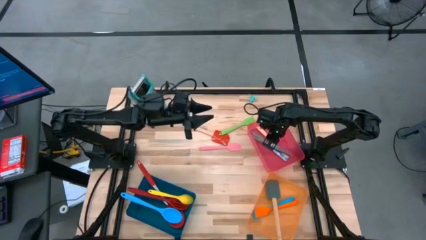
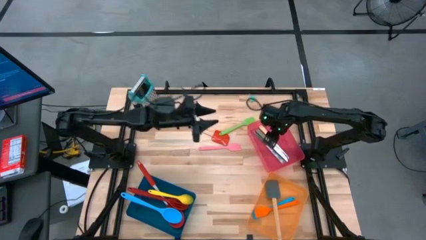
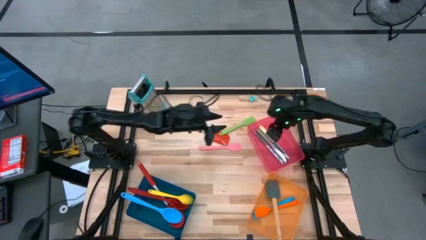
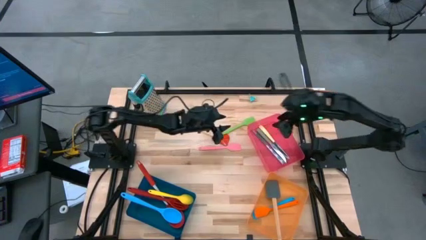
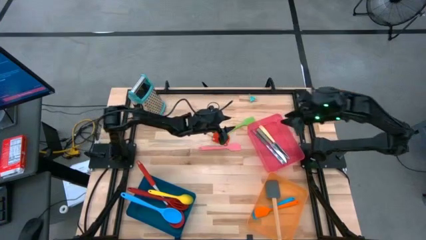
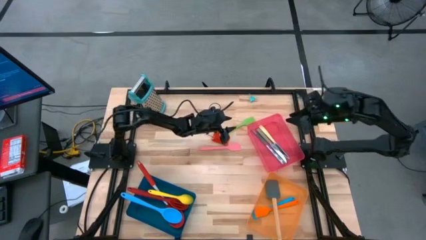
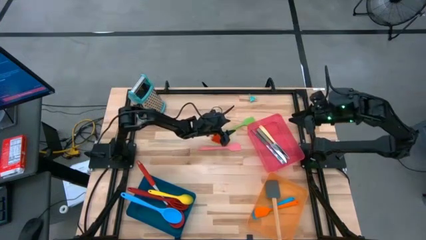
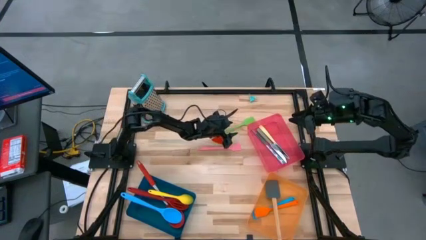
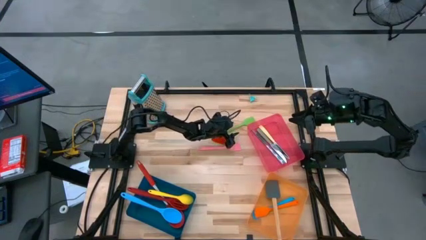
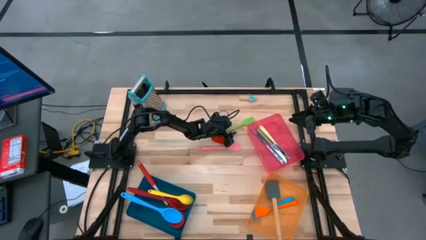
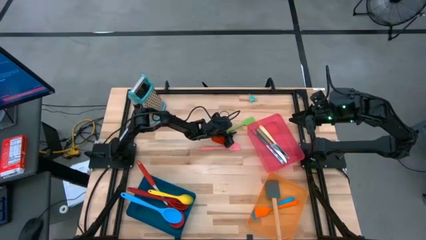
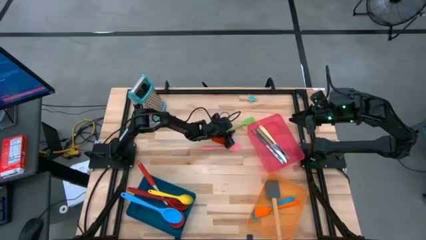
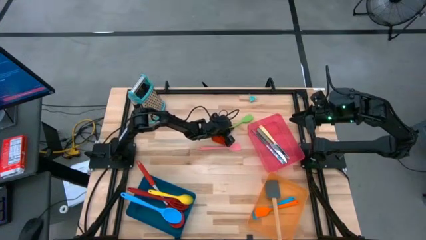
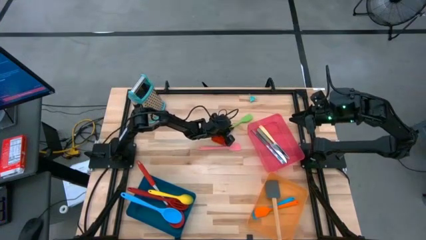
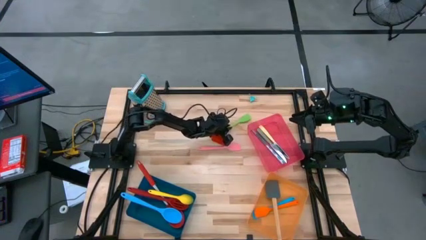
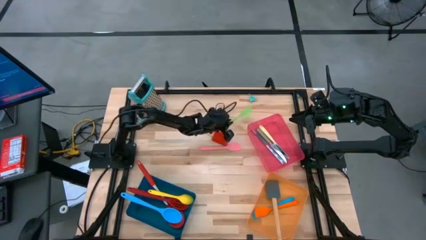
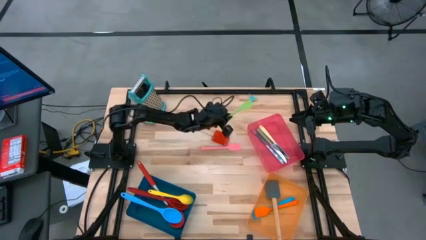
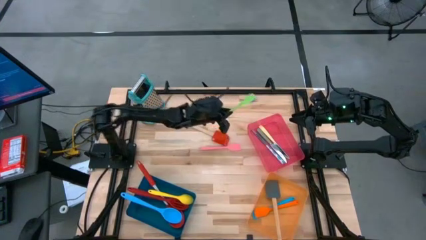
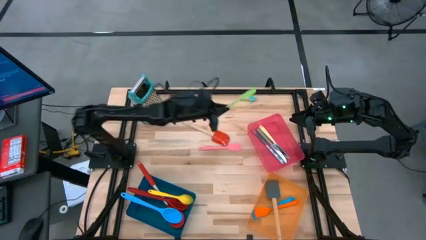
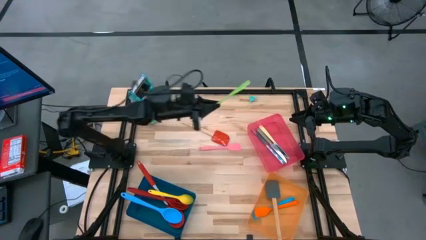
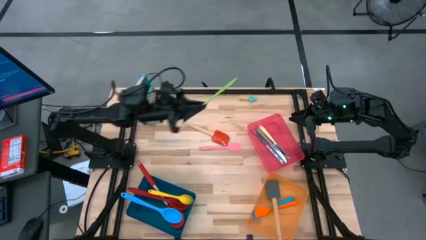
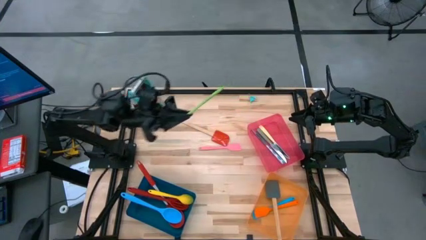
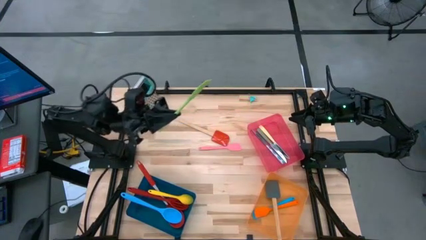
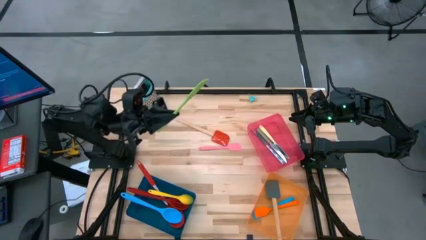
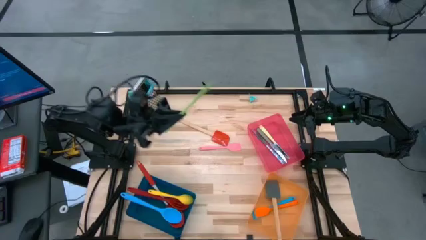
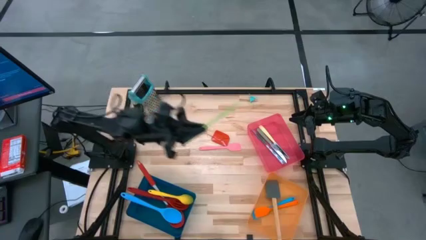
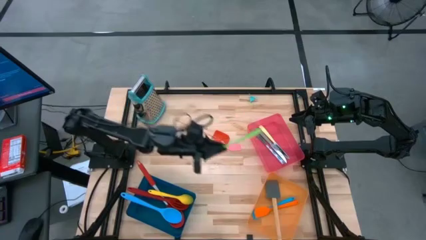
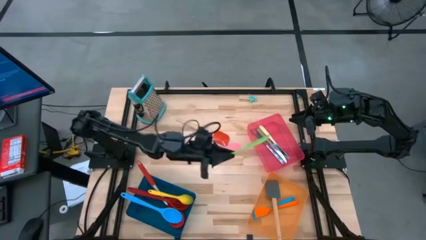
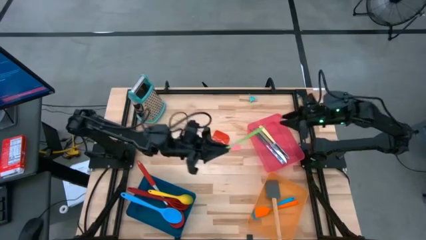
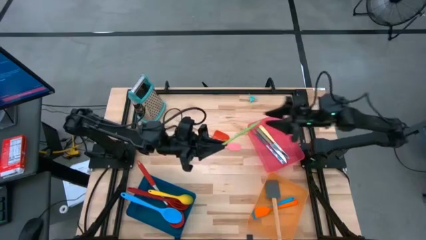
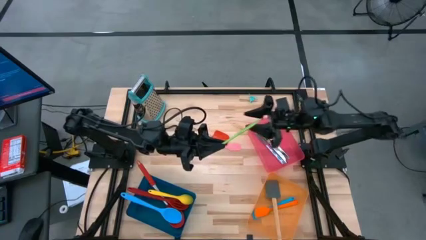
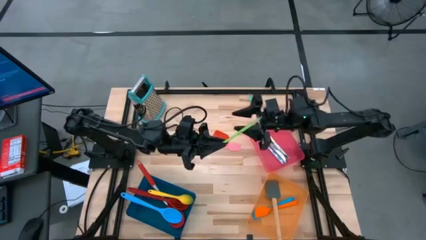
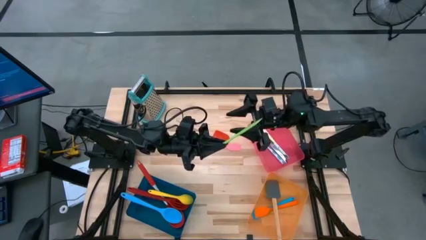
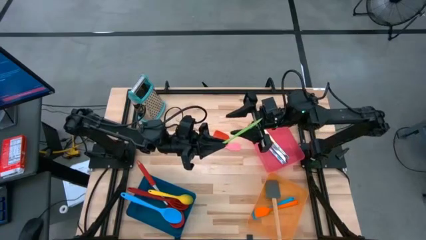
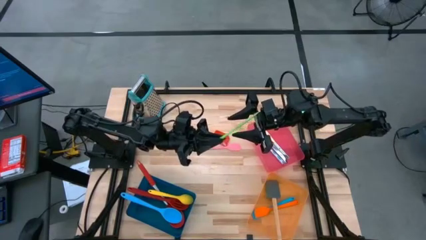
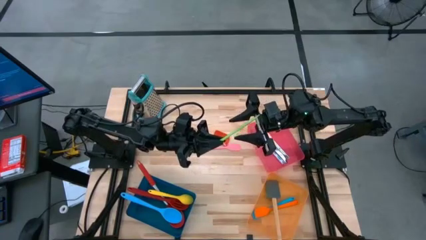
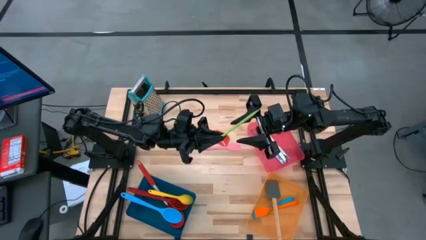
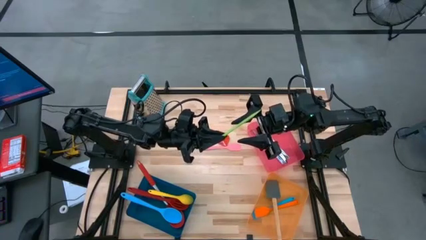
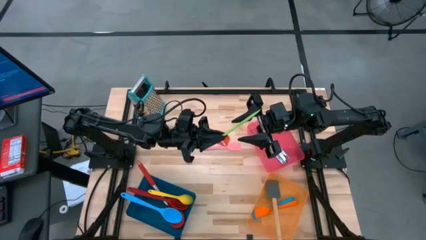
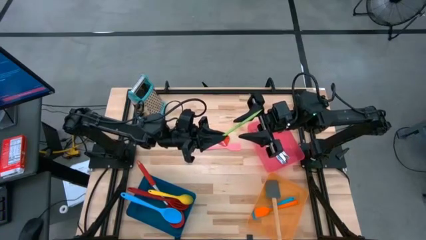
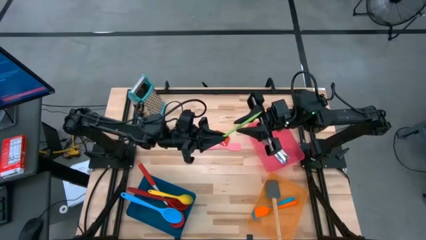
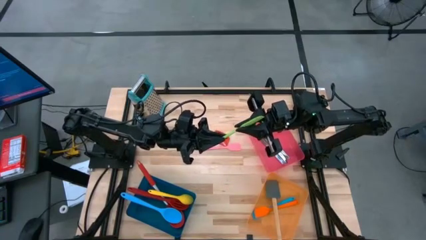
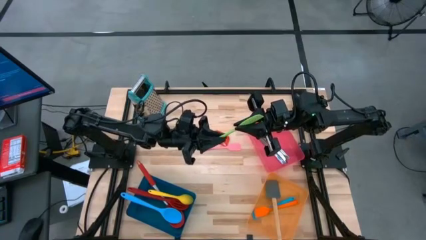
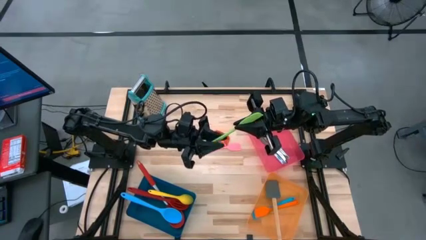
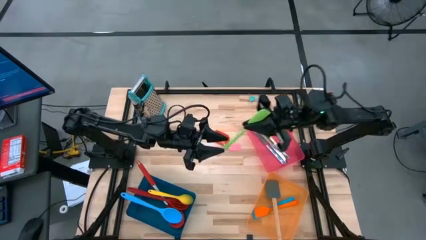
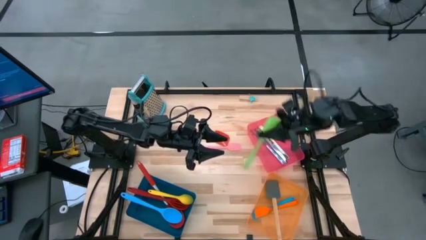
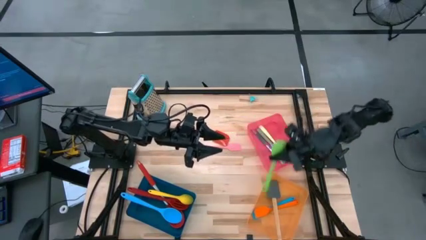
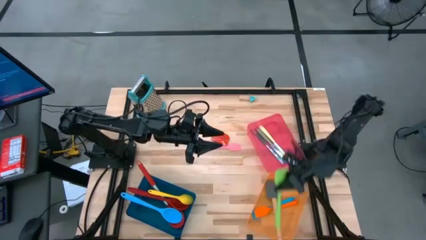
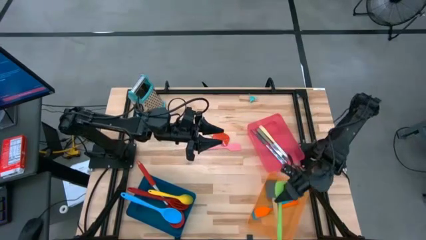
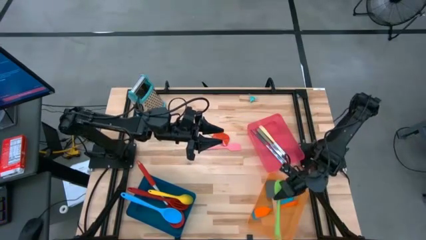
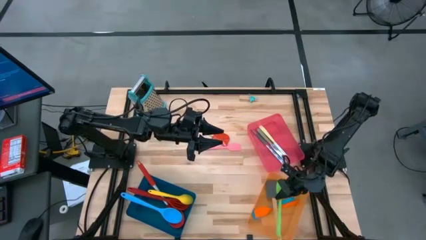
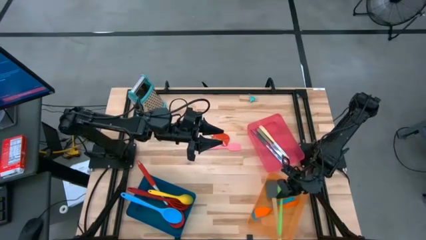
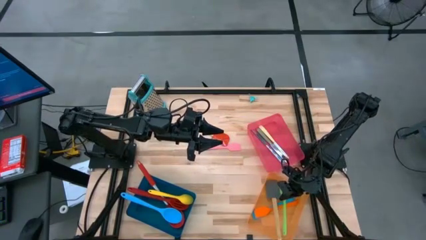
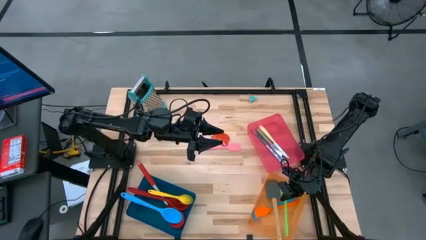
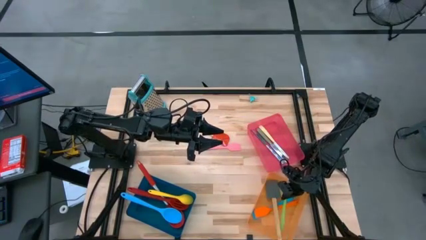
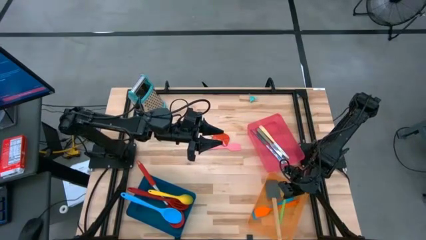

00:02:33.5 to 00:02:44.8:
Task: Pick & Place Kitchen Items
Put the green spatula into the orange bin

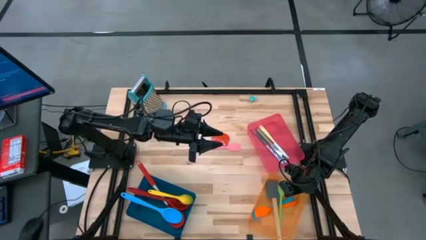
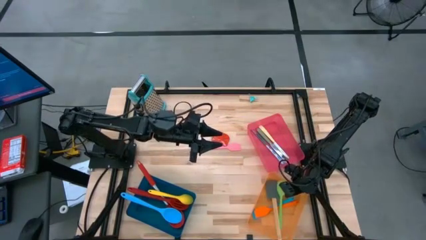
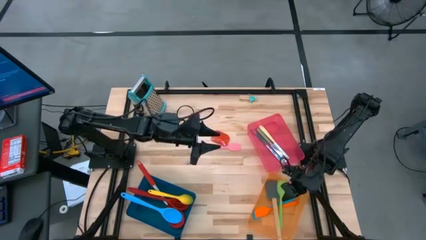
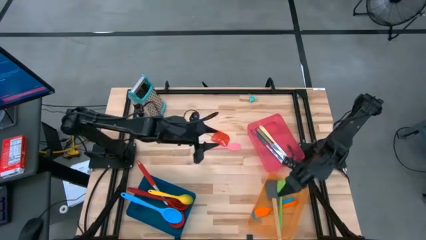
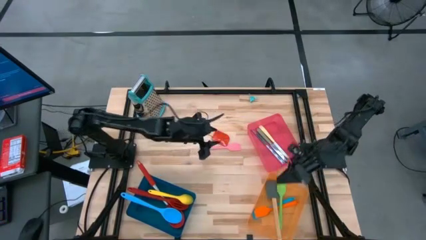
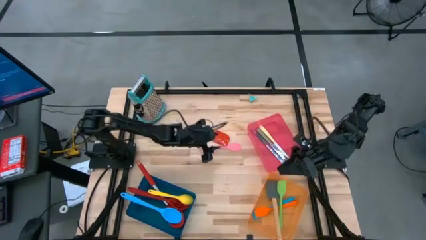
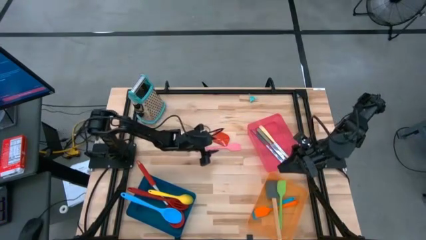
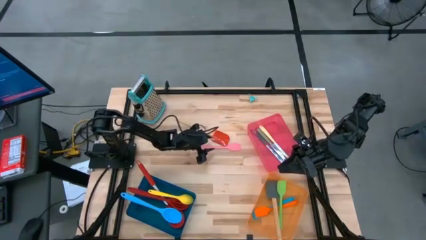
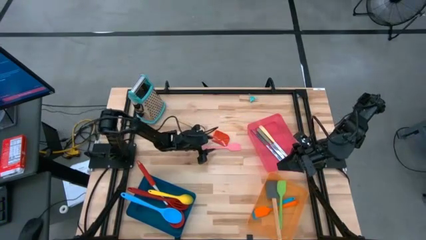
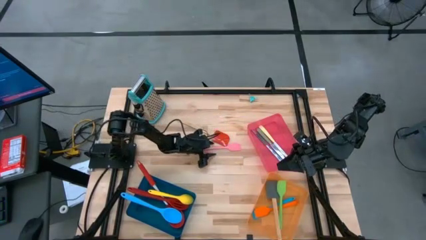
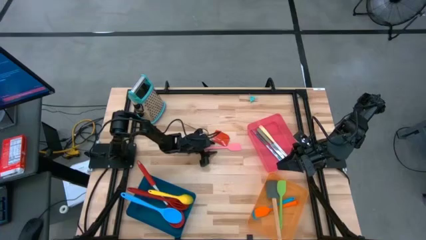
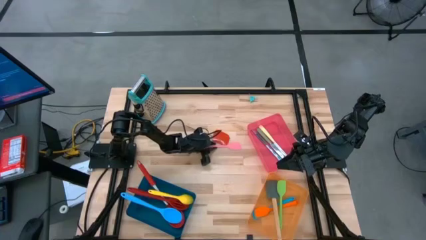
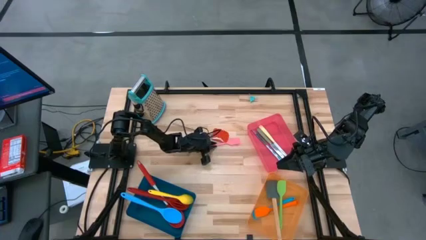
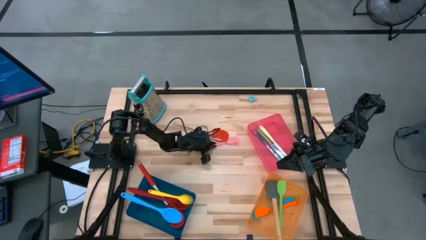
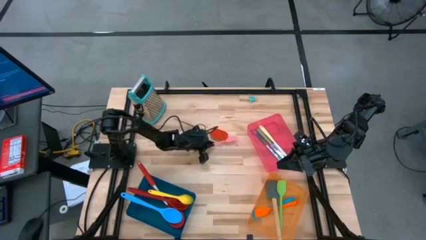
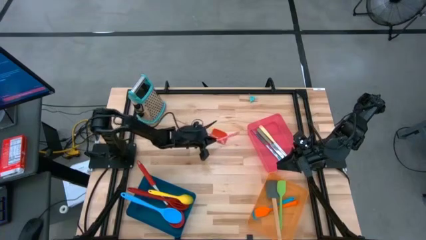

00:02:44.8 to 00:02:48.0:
Put the pink spatula into the orange bin

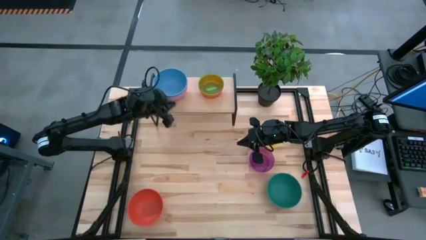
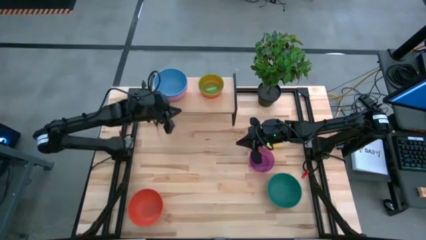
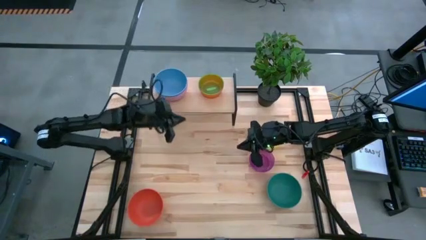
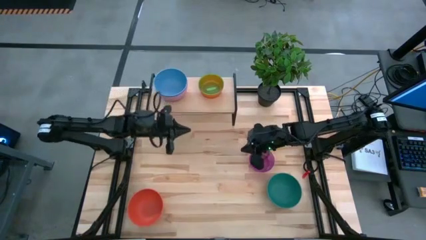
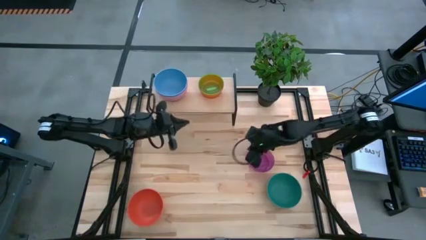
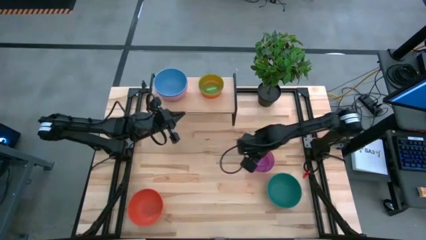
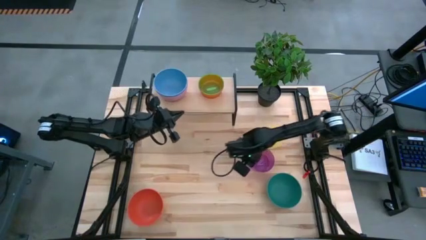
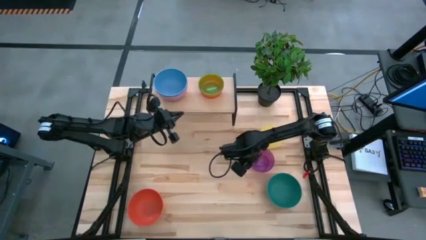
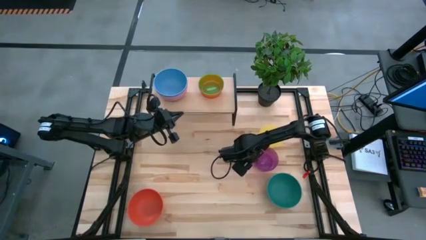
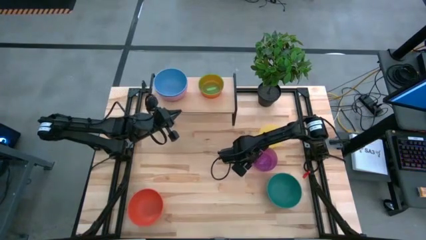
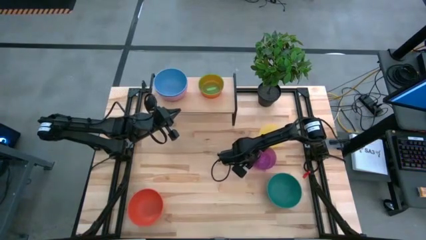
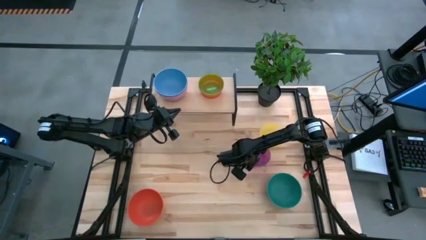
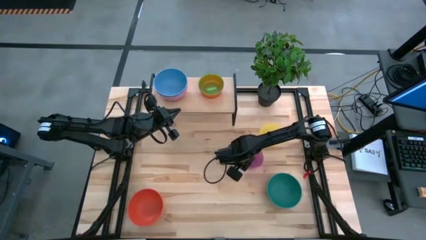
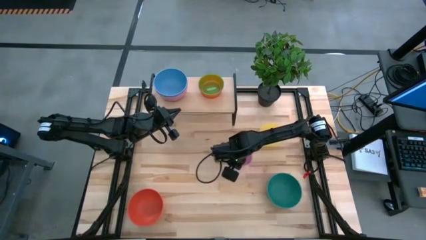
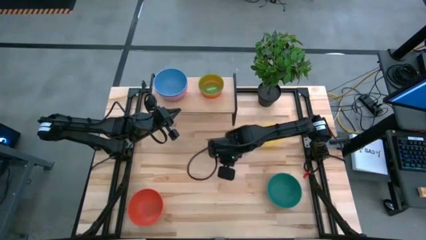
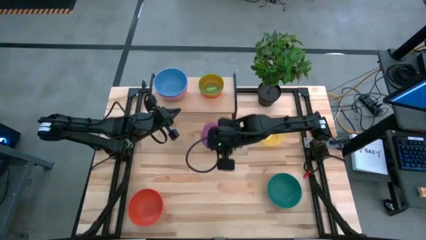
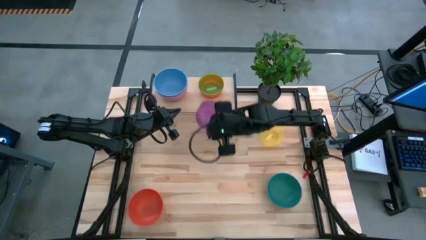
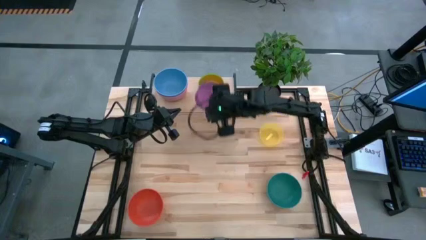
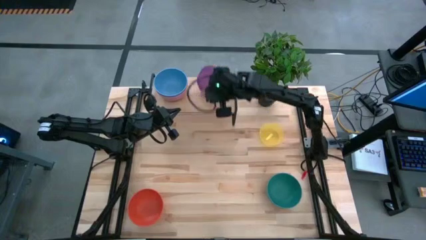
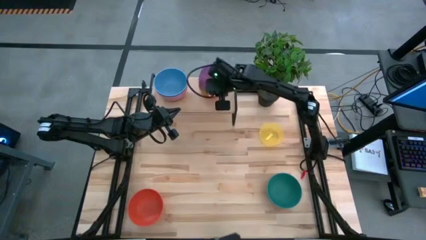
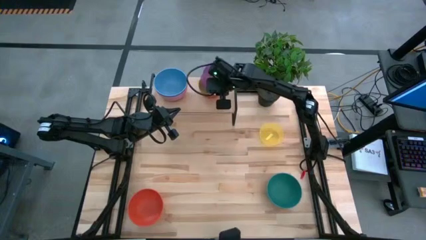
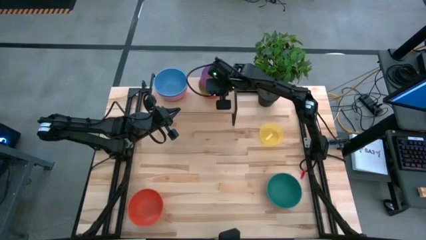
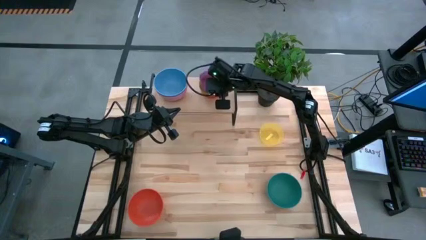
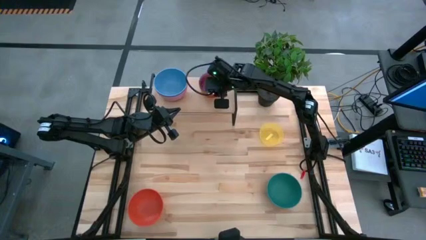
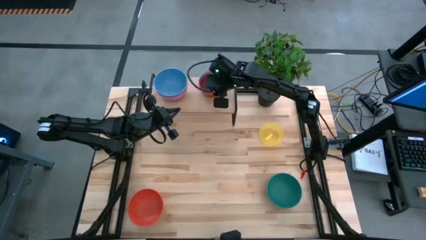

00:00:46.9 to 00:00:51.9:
Task: Place and stack bowls onto a shelf
Stack the small purple bowl on top of the small green bowl on the shelf
